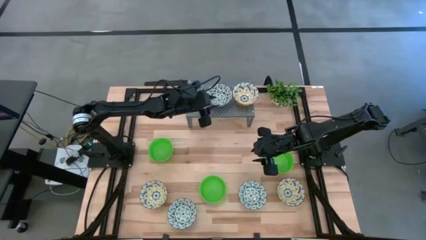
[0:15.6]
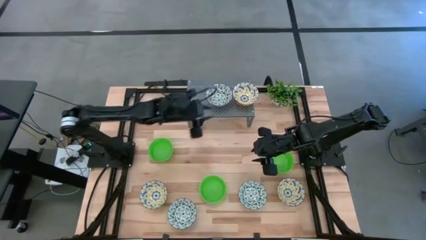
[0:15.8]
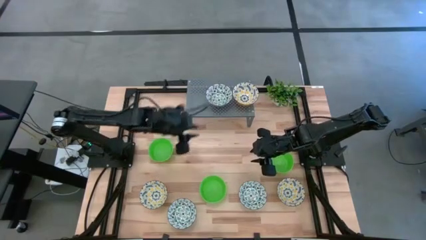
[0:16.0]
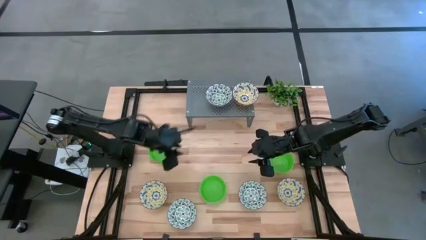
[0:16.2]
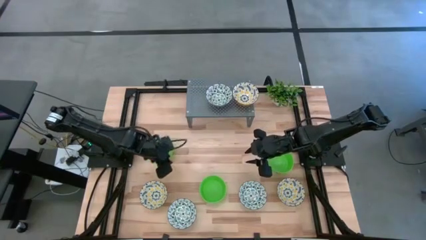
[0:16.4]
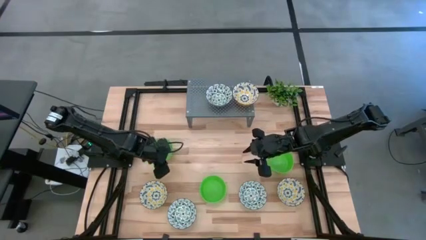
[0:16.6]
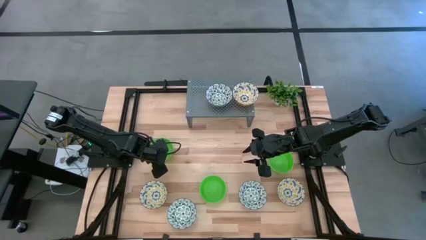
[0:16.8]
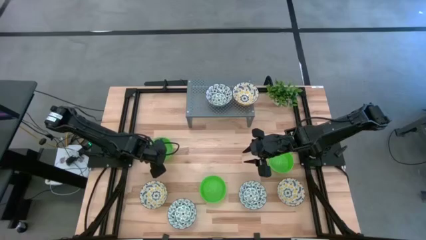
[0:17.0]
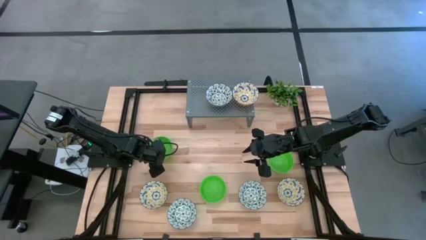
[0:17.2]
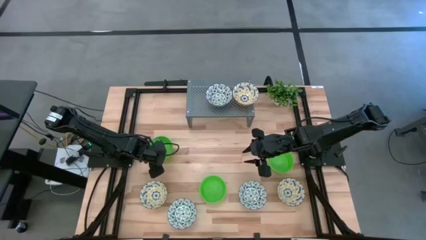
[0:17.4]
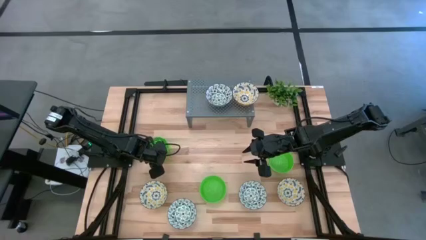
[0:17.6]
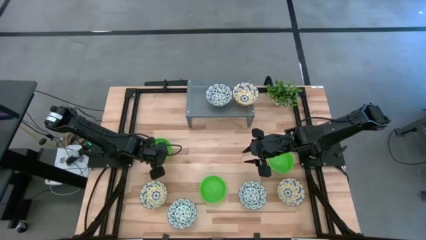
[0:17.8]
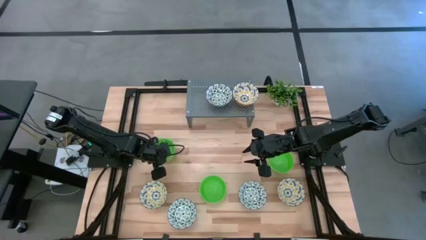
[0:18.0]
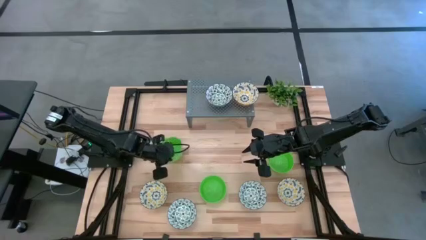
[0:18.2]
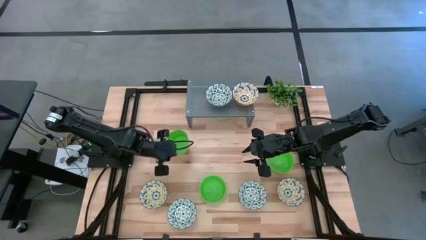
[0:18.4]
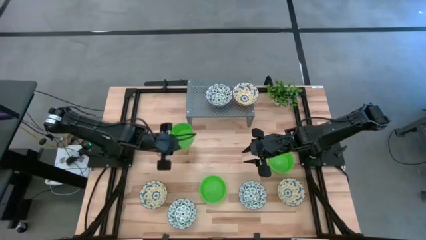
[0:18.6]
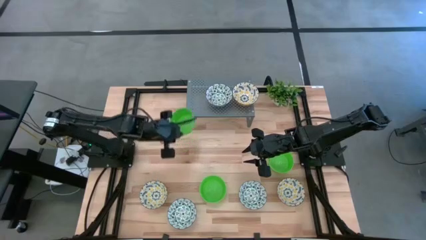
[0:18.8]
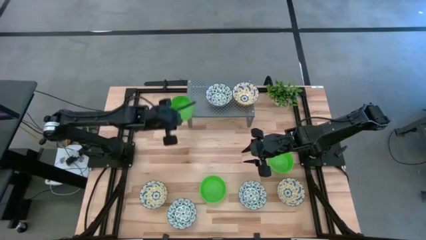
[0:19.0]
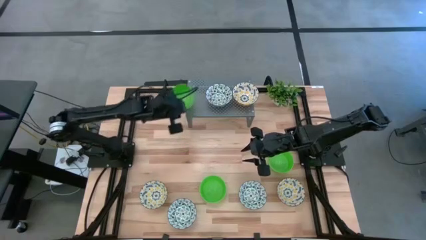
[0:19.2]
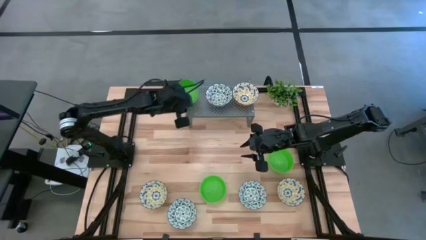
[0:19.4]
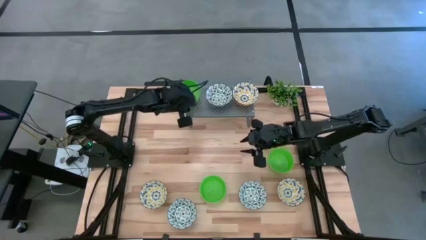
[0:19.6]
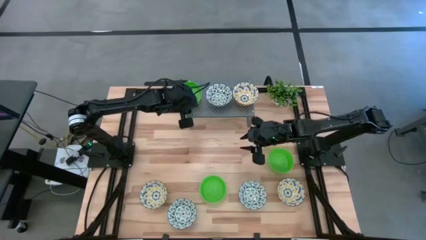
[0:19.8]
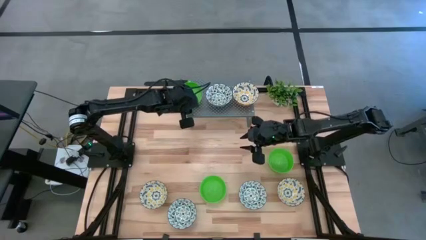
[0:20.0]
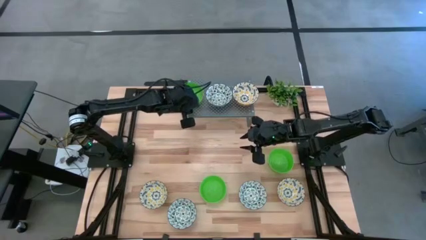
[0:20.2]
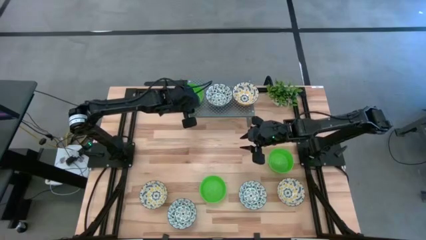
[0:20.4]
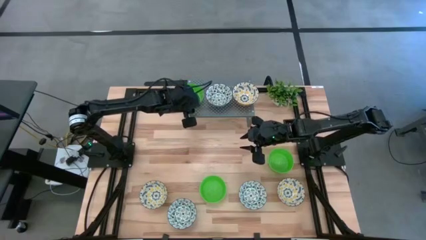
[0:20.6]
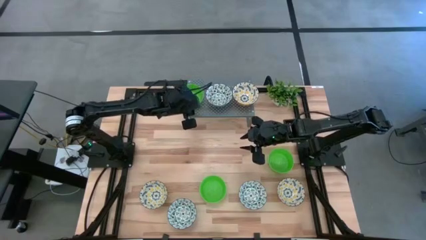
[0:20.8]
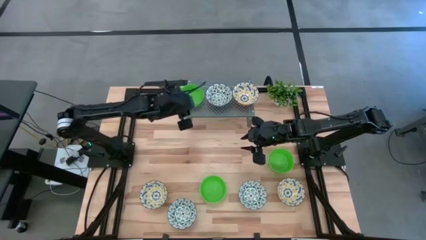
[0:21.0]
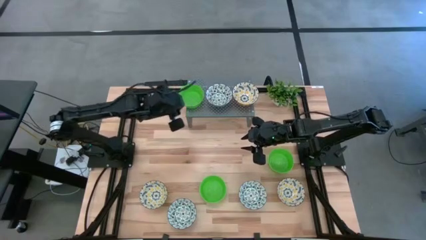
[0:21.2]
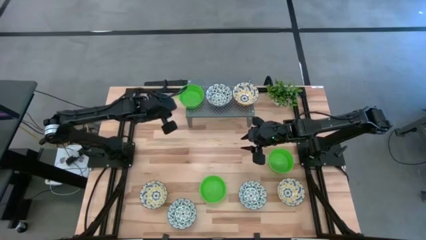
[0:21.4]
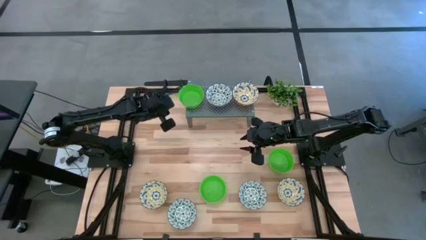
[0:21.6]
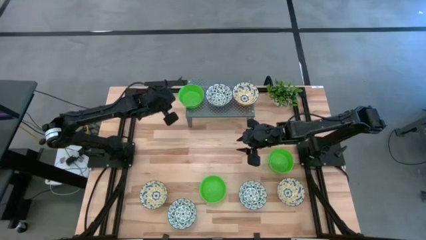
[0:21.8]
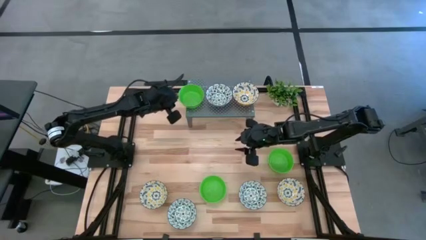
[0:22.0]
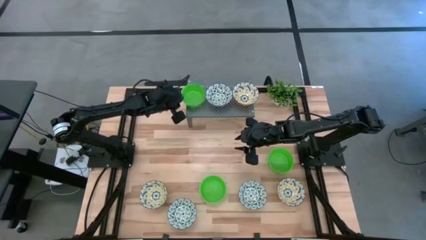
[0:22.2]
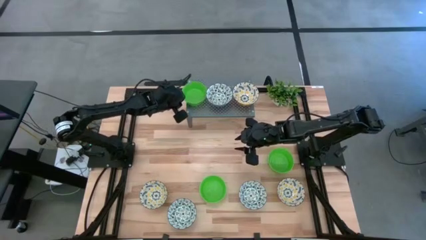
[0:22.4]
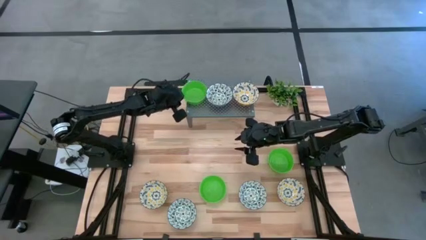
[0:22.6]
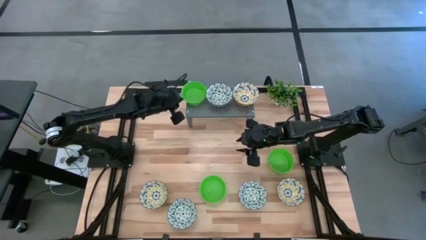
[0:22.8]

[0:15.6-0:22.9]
Task: Pick & Place Mini bowls
Put the left green bowl on the shelf

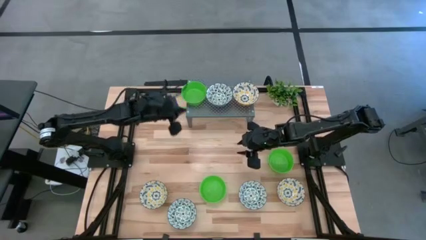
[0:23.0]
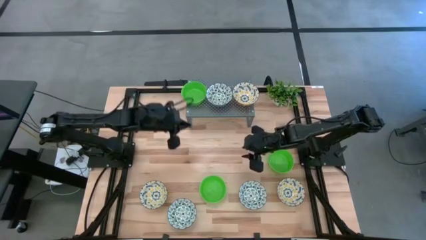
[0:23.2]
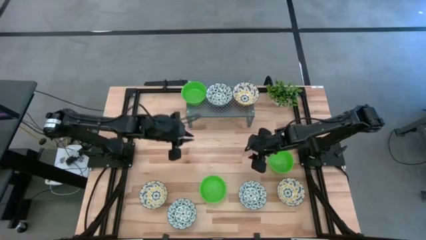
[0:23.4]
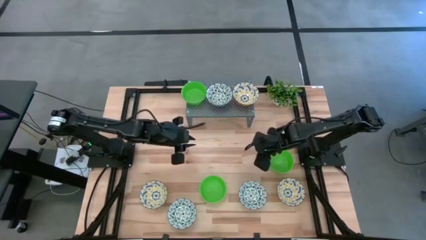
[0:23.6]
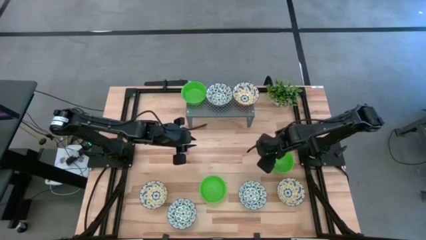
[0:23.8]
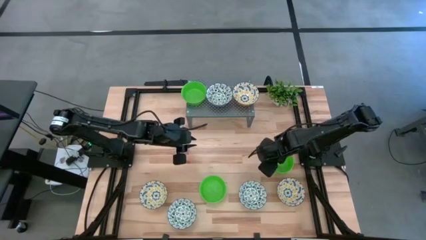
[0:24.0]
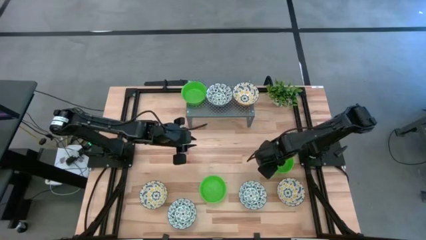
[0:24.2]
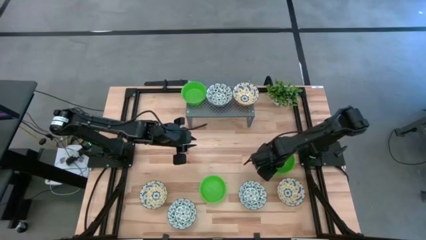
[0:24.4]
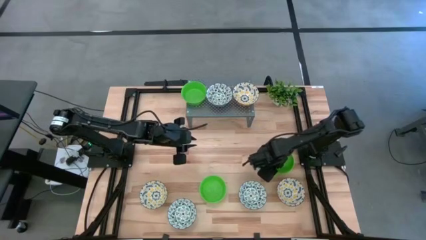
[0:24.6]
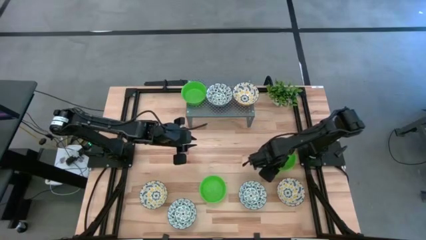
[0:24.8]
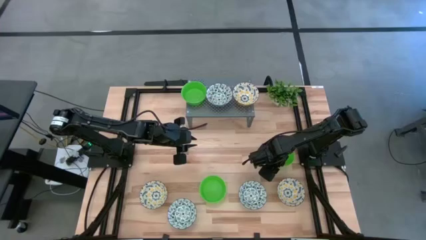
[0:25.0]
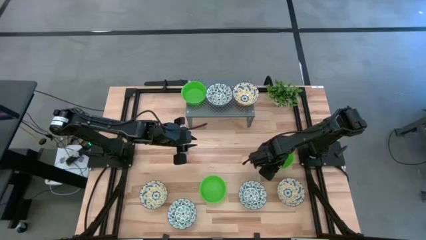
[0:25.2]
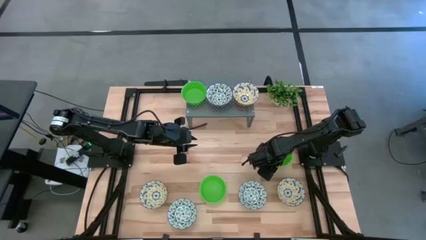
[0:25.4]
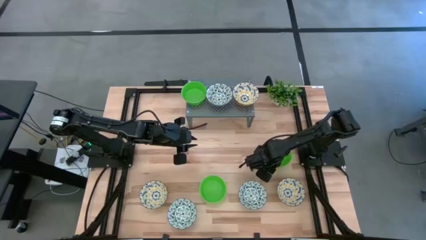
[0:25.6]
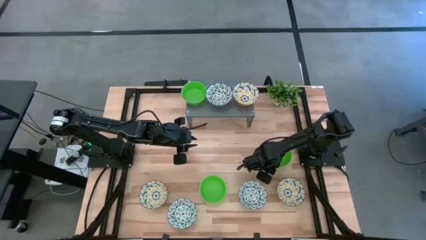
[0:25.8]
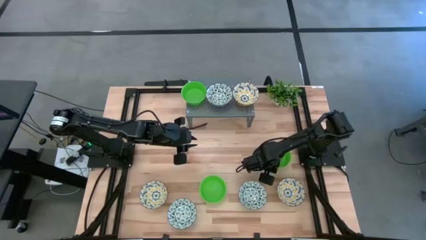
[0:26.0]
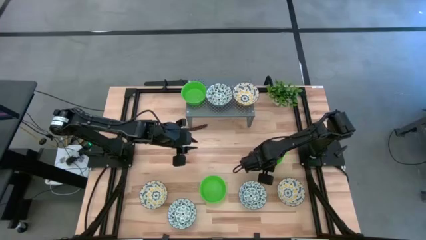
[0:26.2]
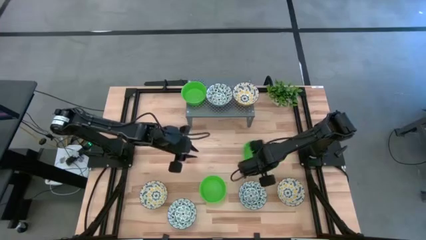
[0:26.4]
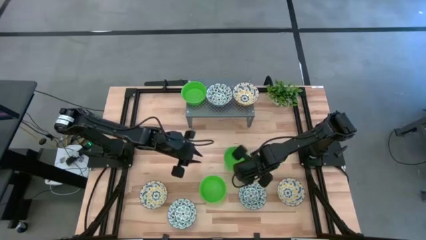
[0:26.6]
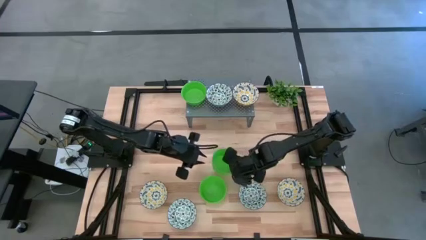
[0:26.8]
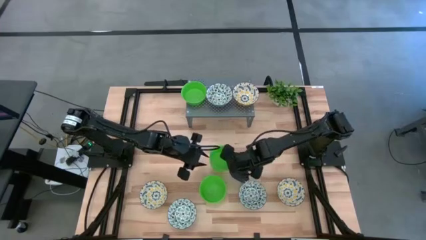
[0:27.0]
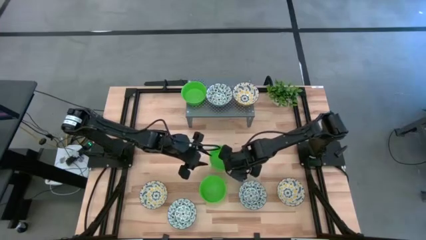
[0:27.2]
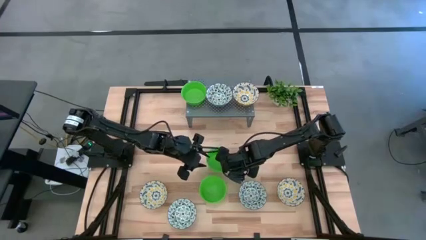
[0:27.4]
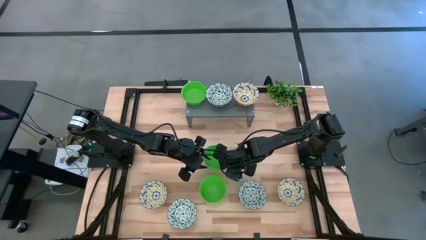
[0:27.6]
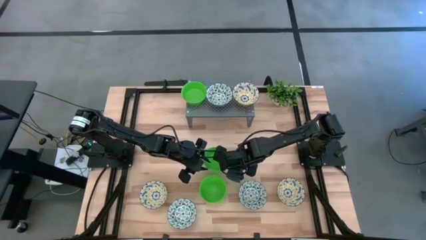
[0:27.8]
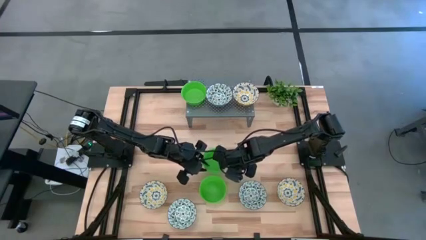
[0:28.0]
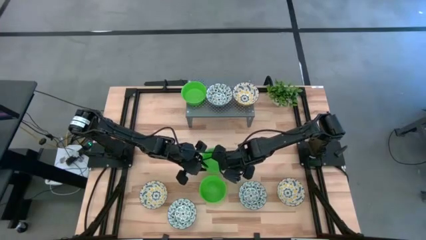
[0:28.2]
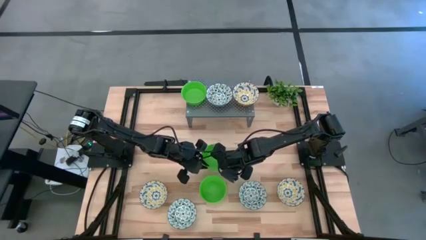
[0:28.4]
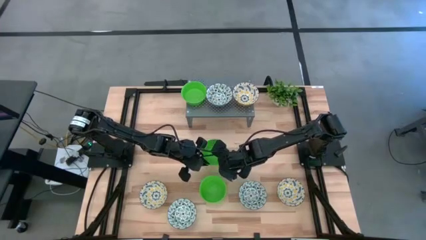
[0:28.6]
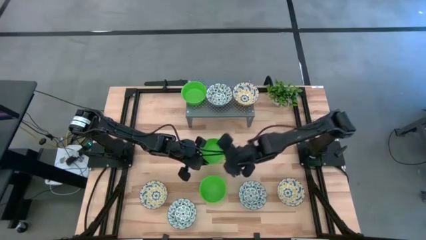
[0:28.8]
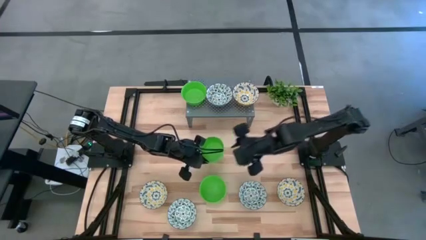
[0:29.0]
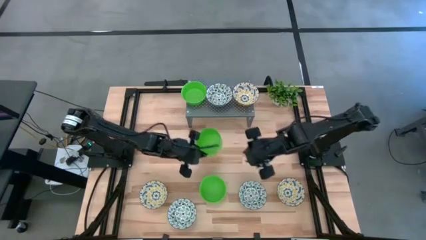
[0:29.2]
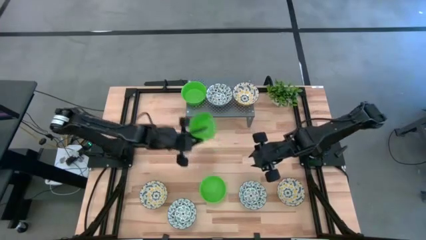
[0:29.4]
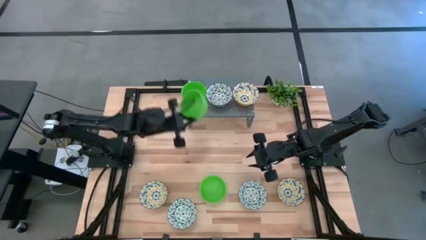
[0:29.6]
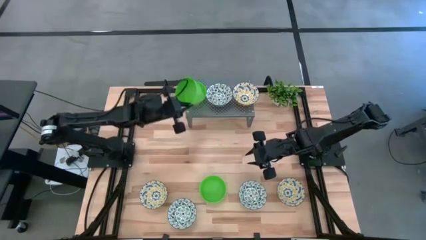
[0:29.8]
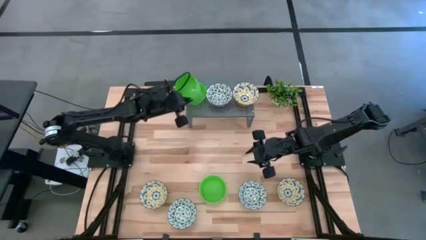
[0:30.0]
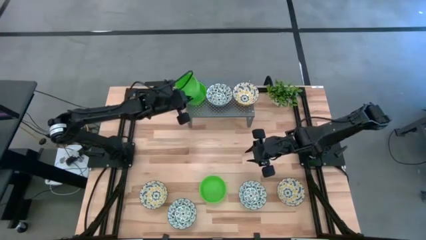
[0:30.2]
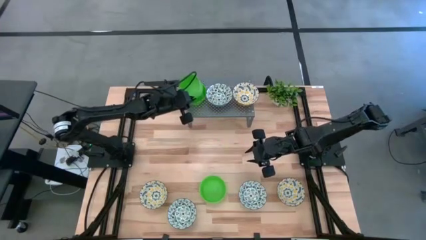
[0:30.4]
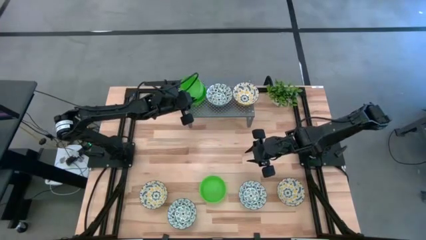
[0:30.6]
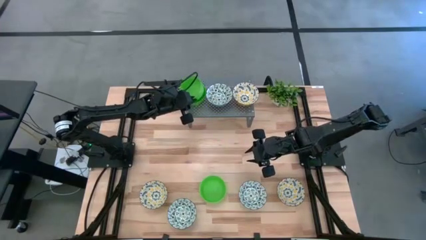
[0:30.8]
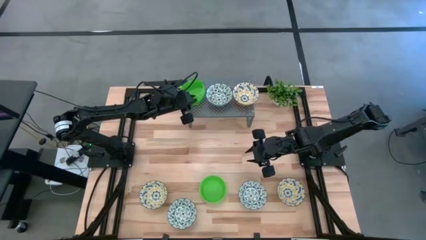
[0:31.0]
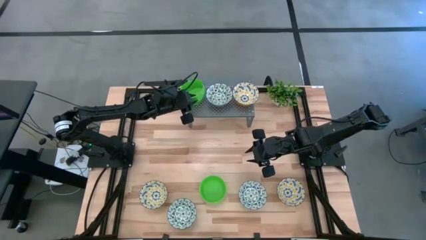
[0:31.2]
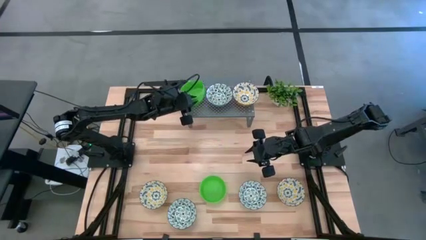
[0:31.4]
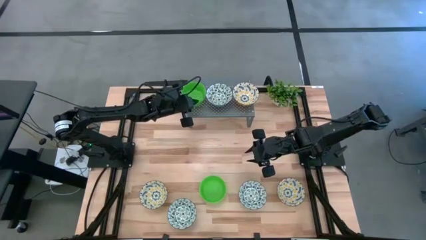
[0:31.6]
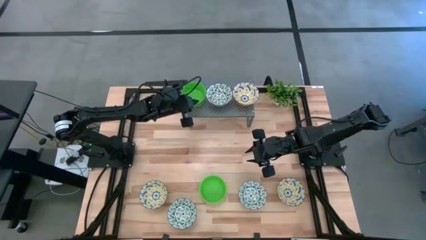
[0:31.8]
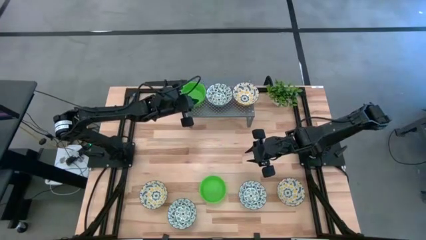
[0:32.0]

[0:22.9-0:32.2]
Stack the right green bowl on top of the green bowl on the shelf
